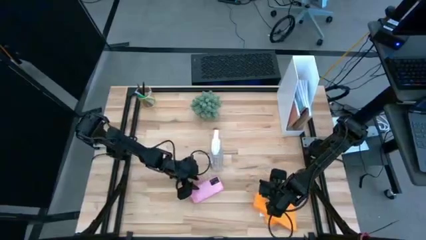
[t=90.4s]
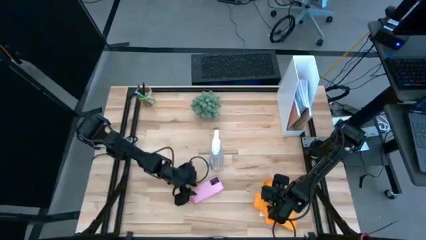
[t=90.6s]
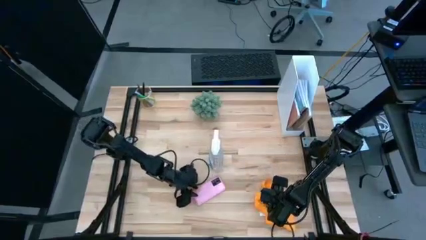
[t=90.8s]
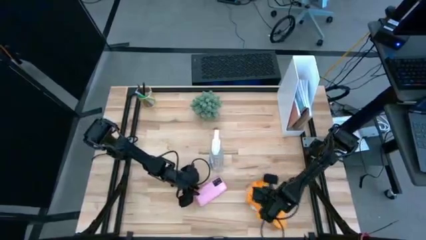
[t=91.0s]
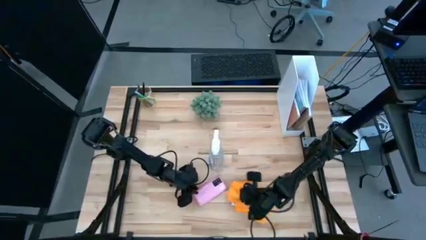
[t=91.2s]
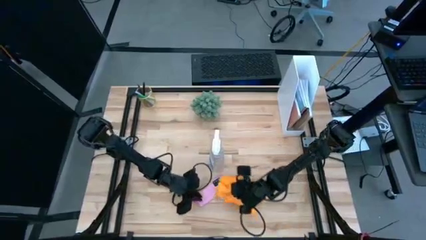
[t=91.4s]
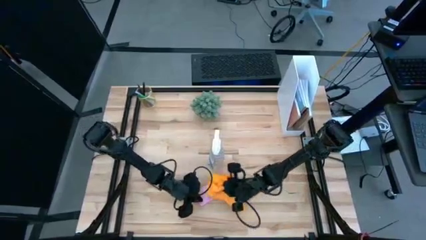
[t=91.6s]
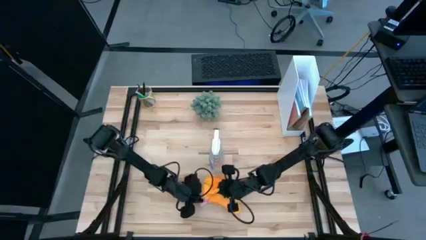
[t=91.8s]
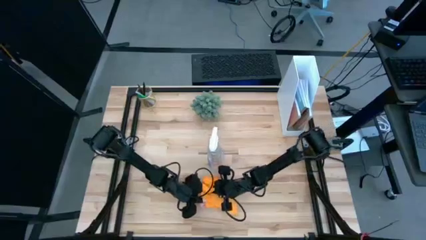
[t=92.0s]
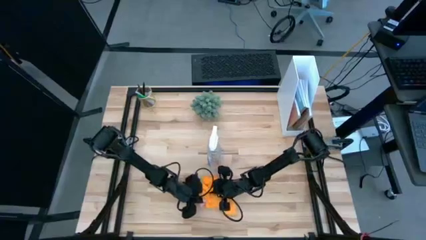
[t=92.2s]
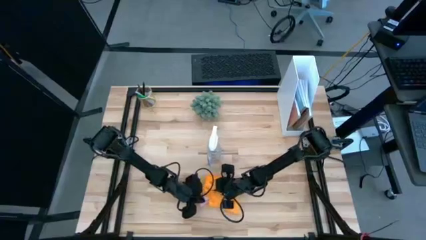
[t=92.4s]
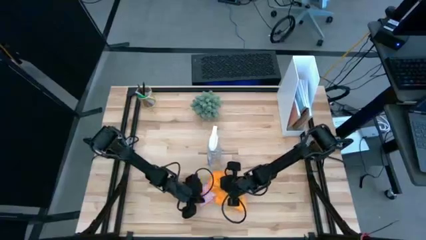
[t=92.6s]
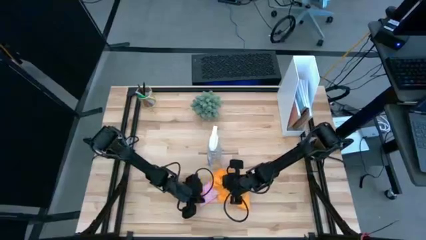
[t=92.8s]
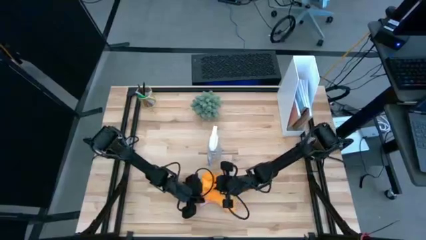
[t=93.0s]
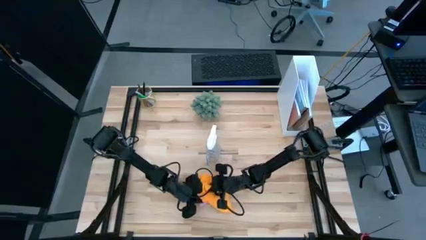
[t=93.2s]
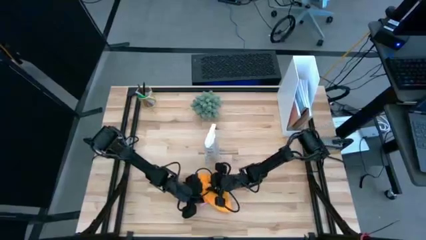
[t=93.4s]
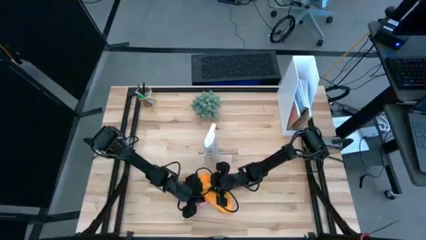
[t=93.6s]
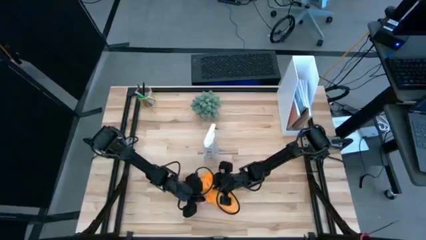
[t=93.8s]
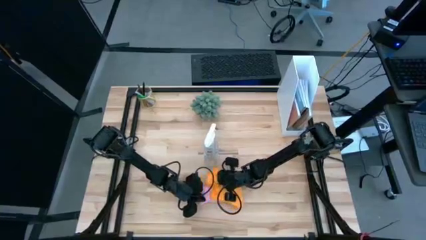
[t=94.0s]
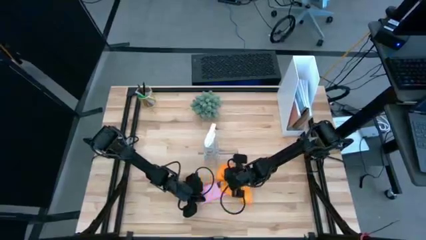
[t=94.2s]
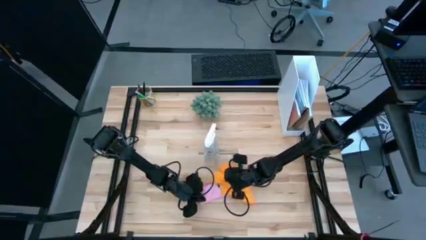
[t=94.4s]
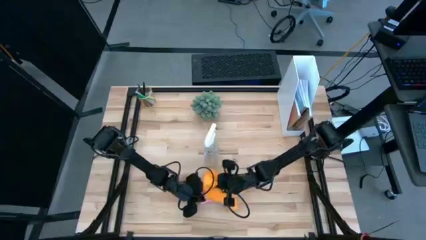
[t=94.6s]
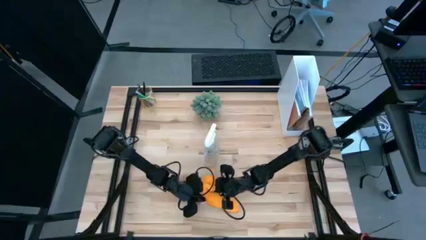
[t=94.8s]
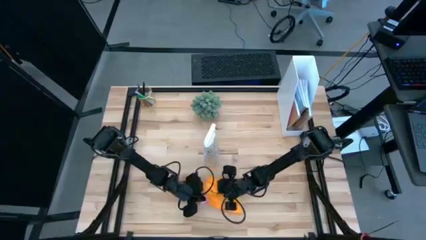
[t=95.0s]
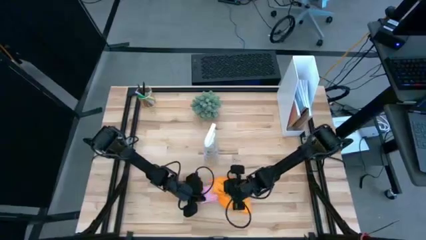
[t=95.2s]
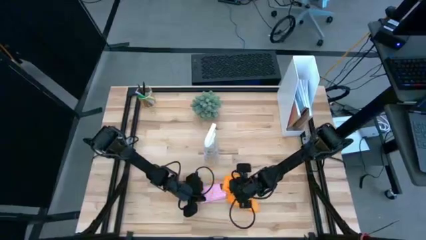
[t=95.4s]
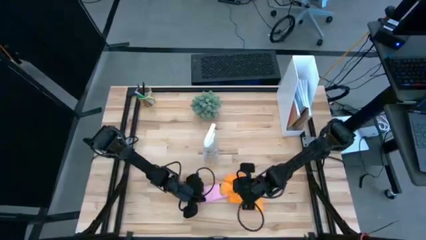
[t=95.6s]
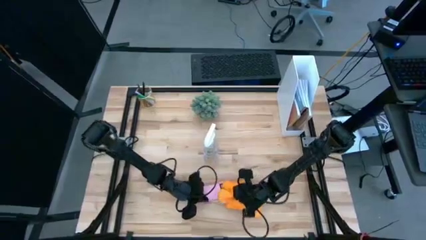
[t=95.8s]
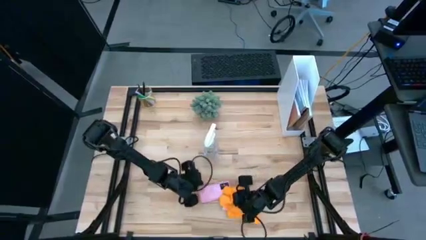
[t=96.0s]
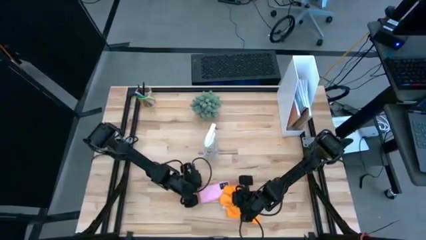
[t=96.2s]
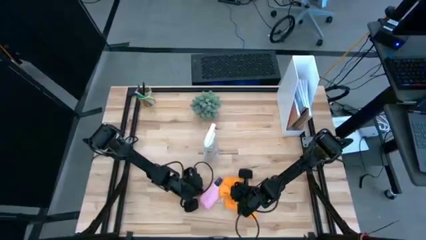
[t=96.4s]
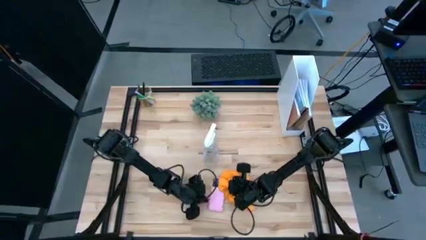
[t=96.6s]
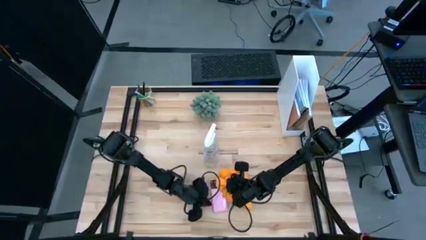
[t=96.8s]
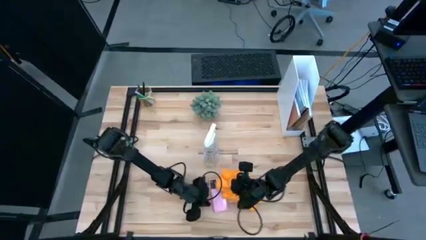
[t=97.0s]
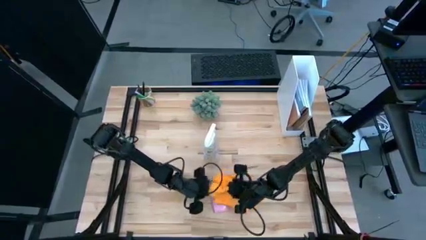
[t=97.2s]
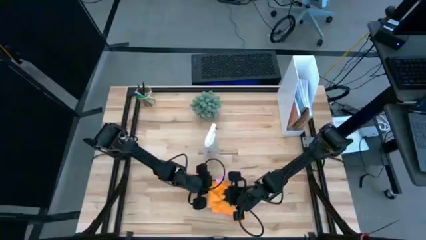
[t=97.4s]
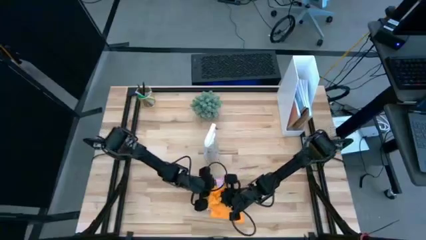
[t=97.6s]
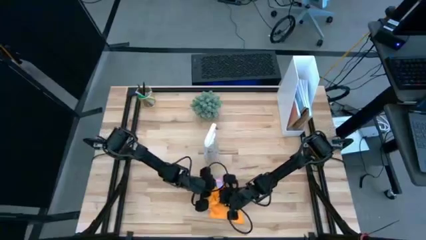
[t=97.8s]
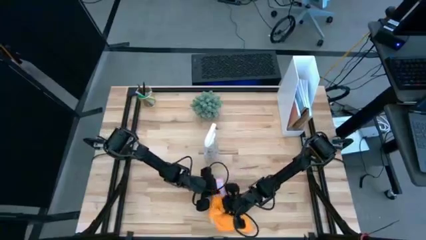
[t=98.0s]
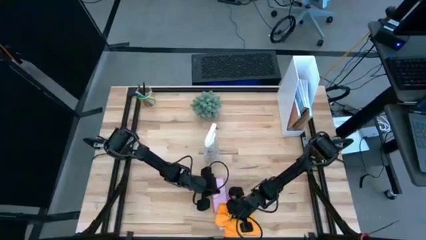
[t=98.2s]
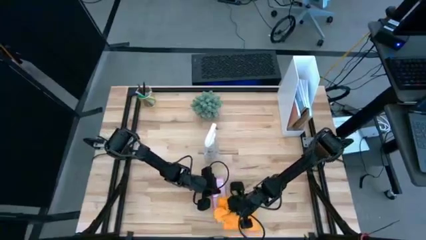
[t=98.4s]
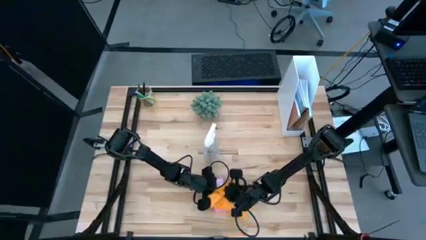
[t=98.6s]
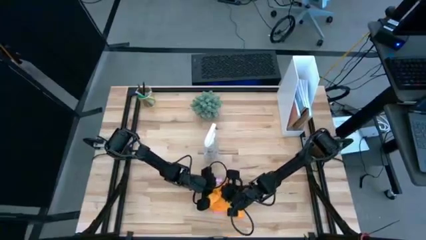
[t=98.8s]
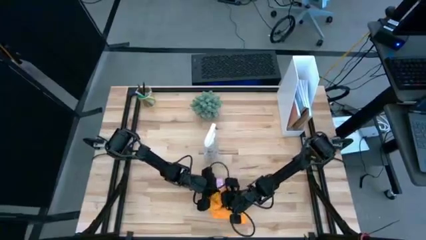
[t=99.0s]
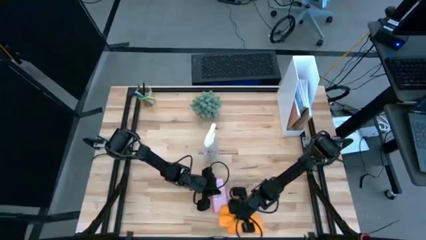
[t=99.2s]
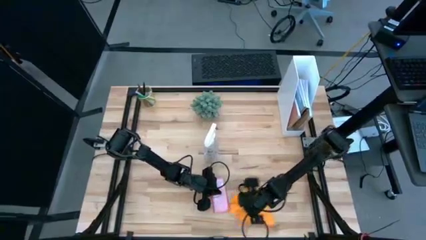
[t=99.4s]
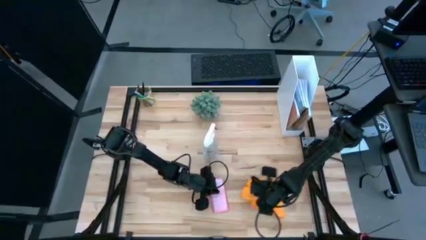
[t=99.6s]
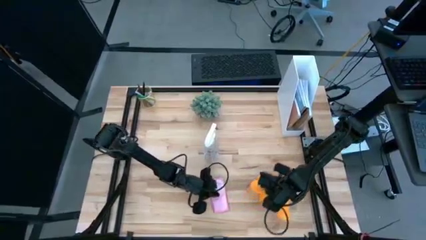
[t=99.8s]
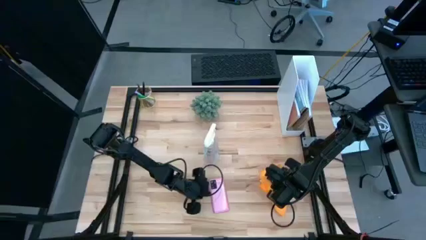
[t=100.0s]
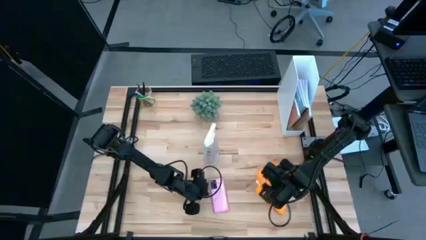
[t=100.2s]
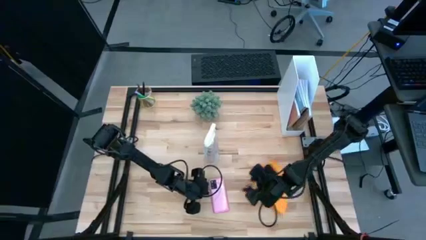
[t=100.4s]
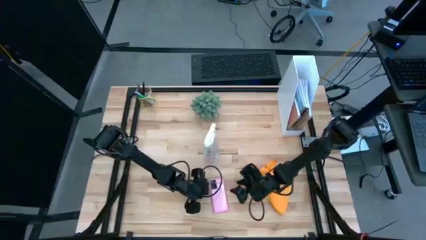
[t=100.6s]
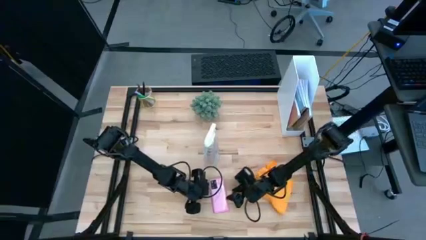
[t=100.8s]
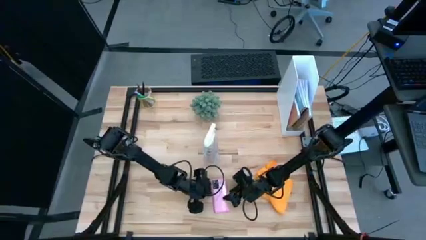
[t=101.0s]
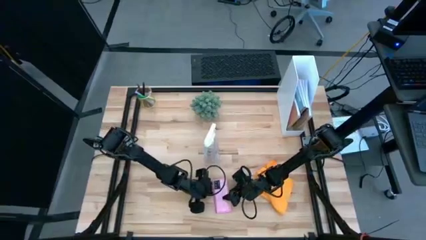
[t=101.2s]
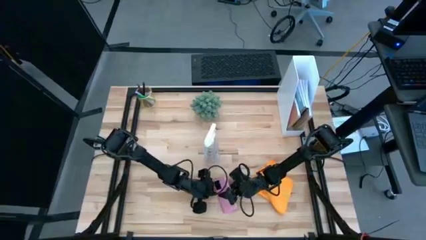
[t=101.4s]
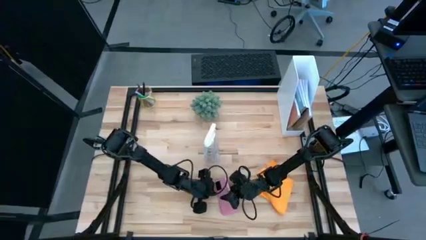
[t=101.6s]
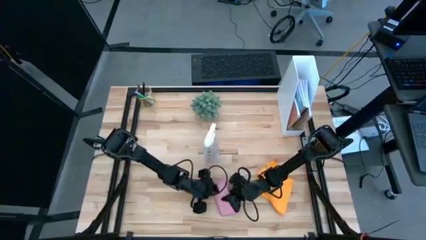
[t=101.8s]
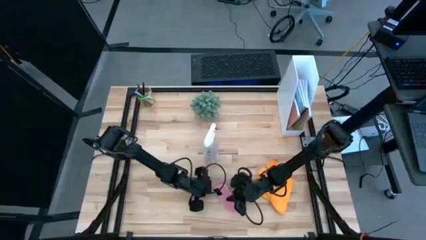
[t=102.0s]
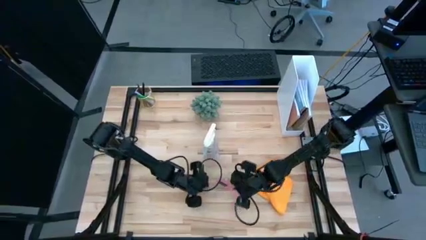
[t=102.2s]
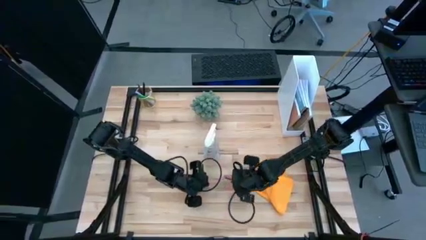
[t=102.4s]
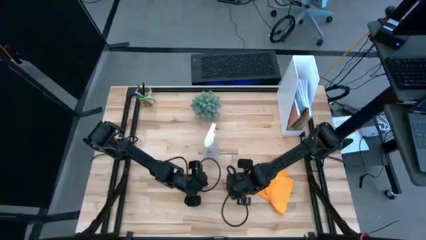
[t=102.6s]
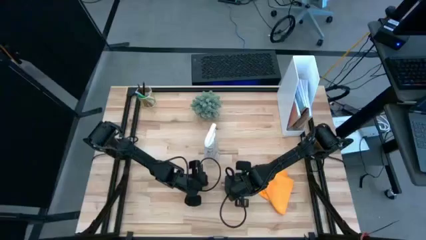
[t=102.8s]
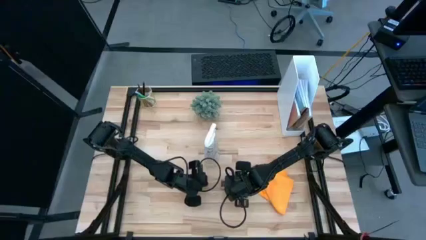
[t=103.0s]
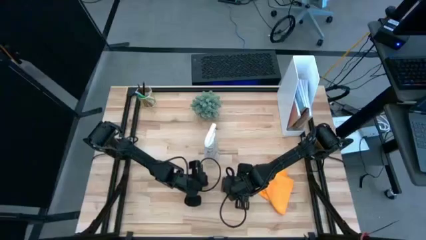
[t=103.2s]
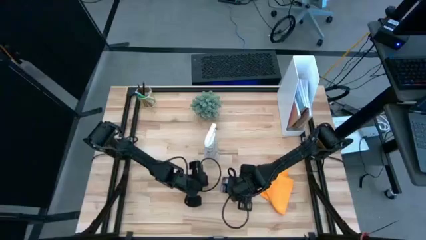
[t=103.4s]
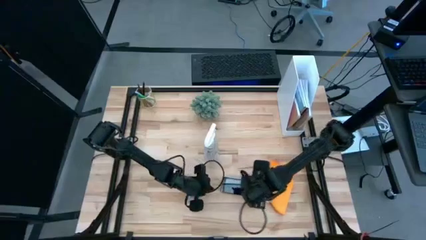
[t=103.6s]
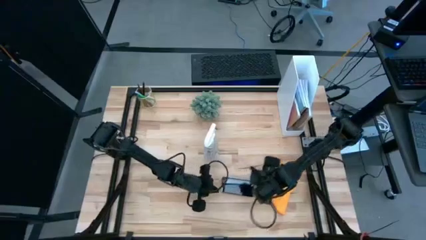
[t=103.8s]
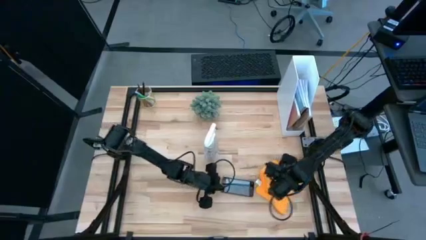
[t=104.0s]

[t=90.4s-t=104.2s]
Task: Apply microfiber cloth
Wipe the back and front of the cellphone with the yellow microfiber cloth
